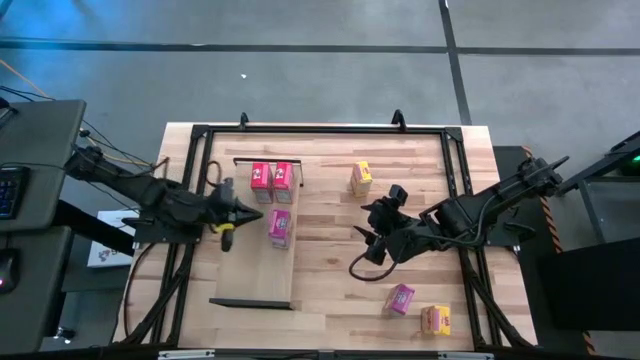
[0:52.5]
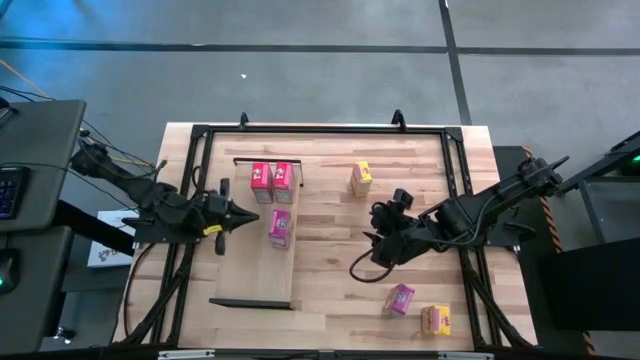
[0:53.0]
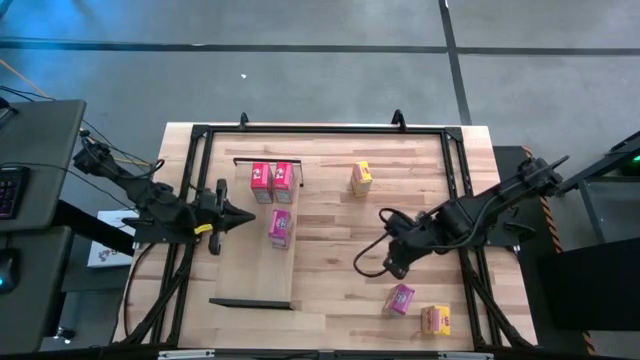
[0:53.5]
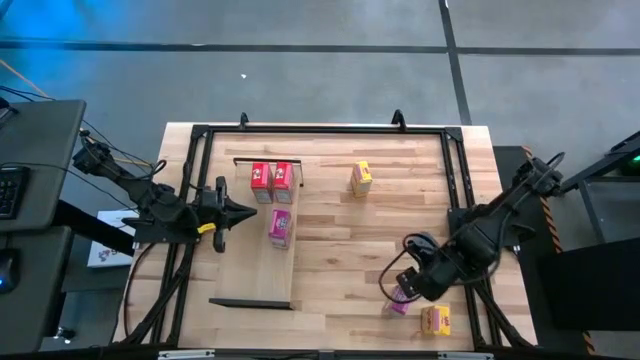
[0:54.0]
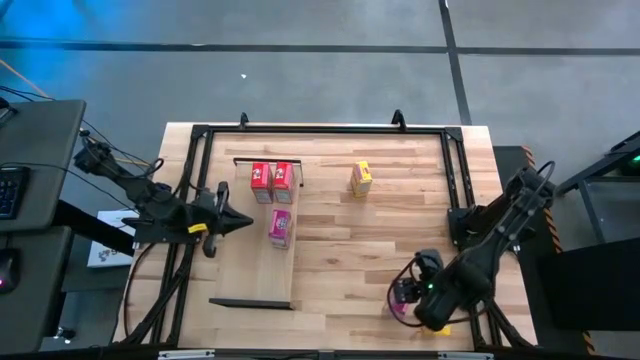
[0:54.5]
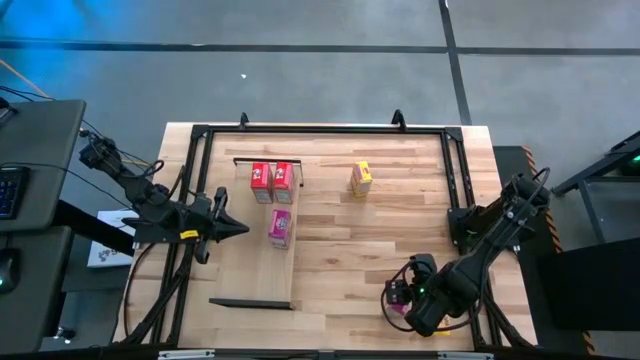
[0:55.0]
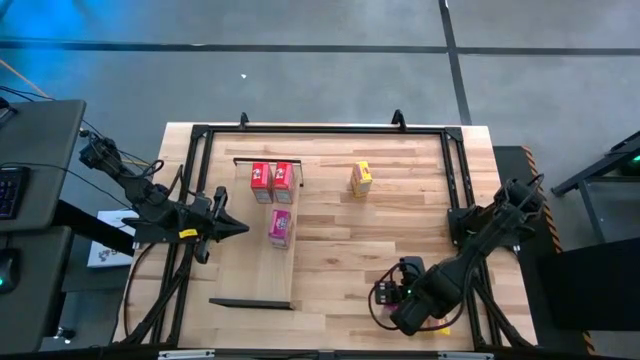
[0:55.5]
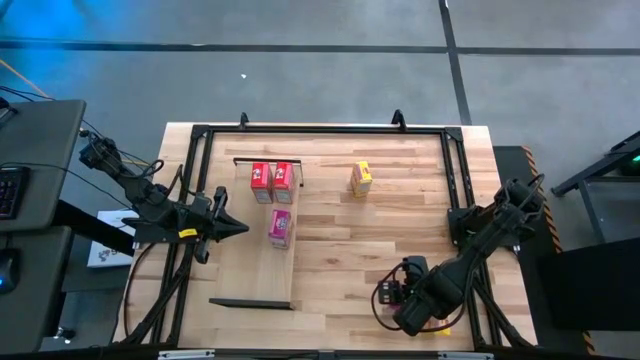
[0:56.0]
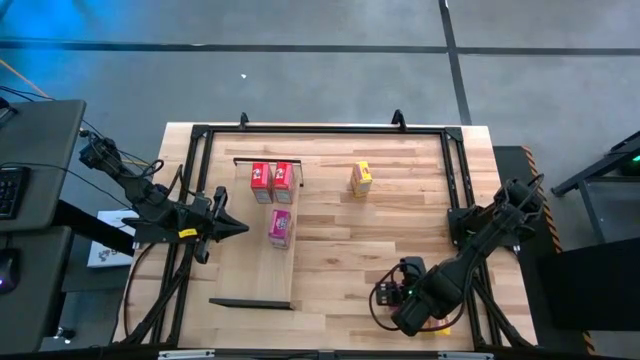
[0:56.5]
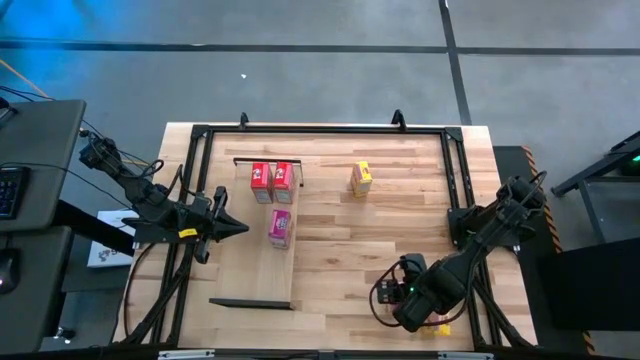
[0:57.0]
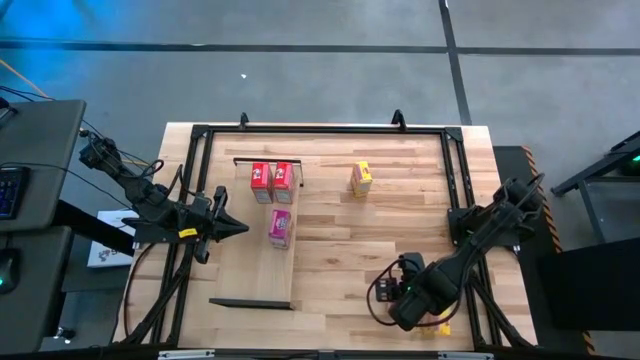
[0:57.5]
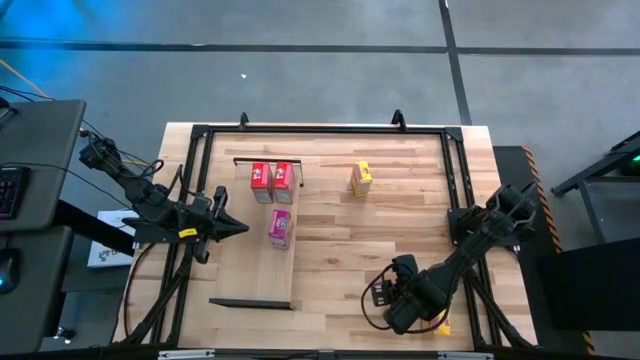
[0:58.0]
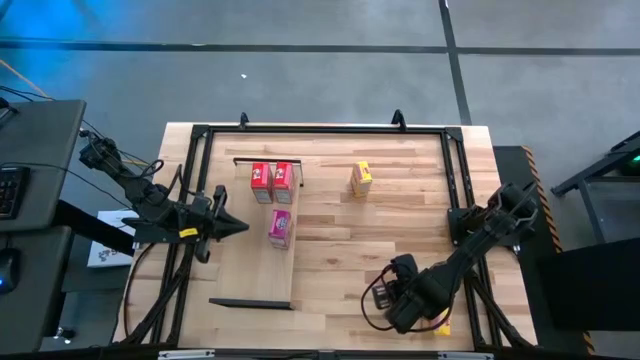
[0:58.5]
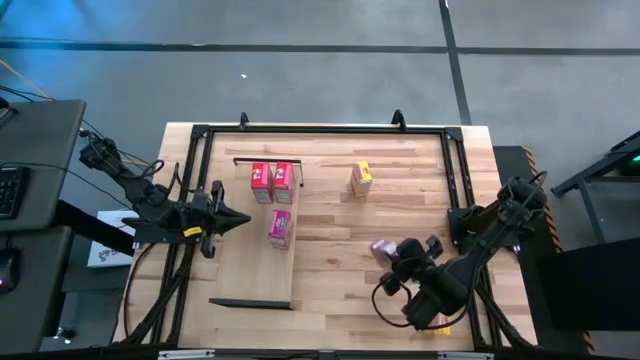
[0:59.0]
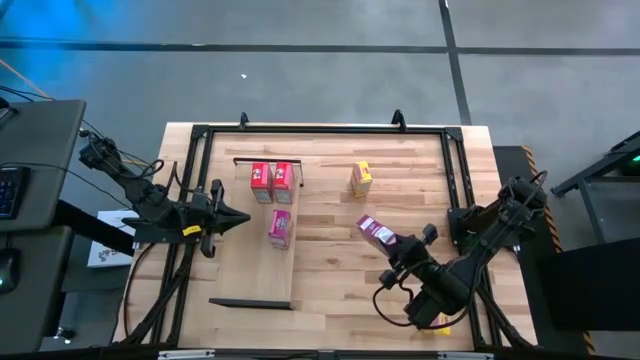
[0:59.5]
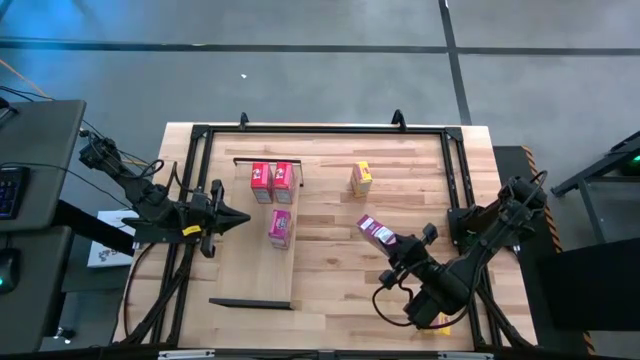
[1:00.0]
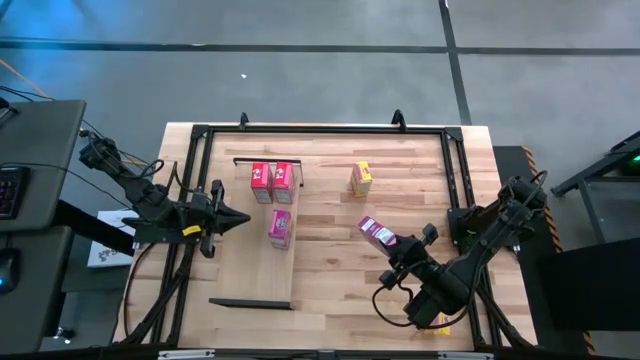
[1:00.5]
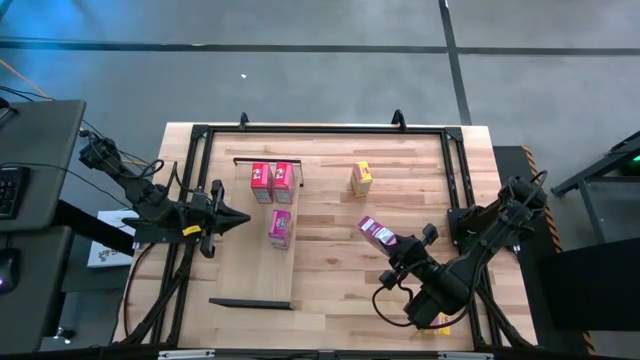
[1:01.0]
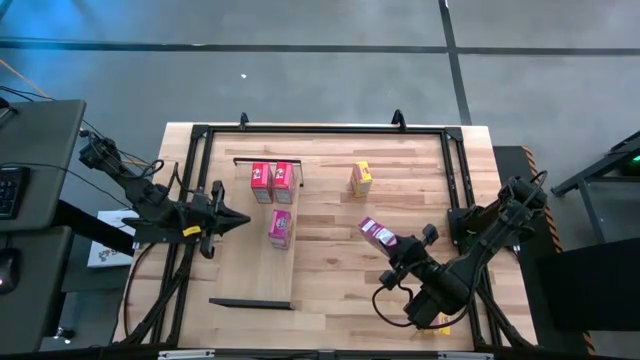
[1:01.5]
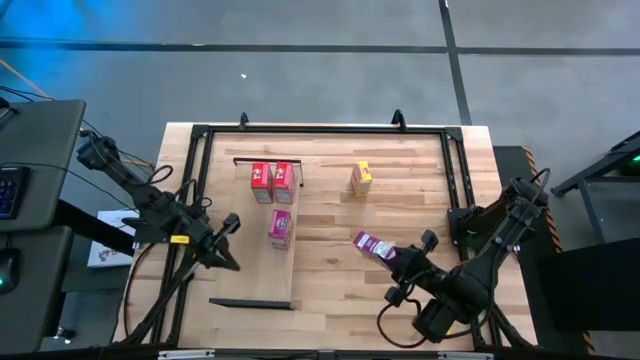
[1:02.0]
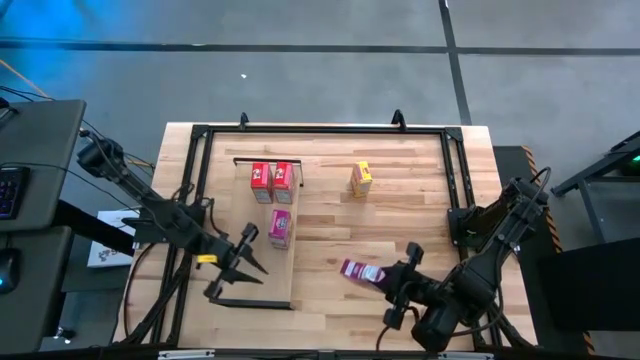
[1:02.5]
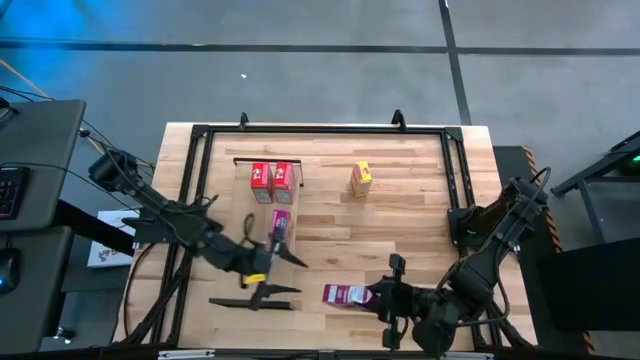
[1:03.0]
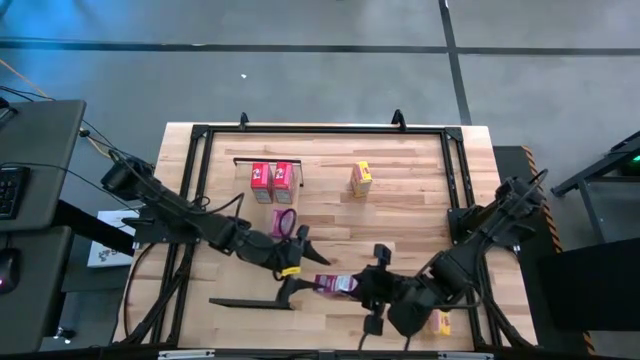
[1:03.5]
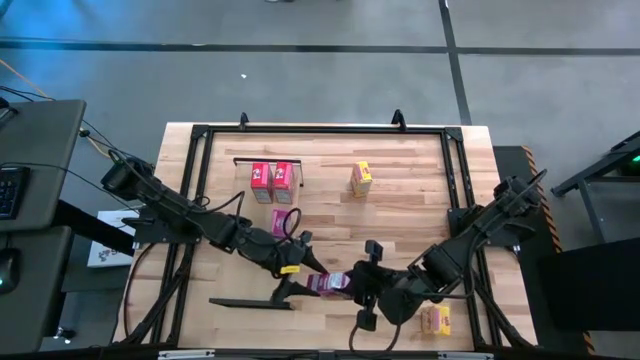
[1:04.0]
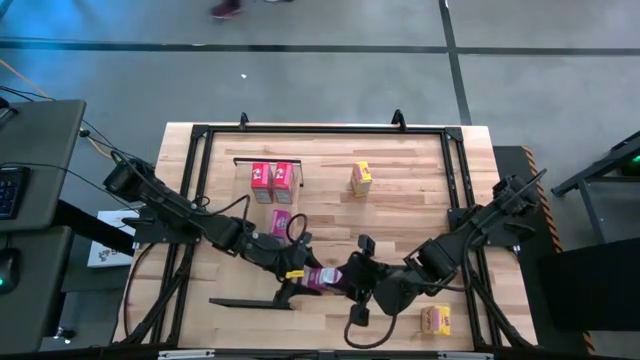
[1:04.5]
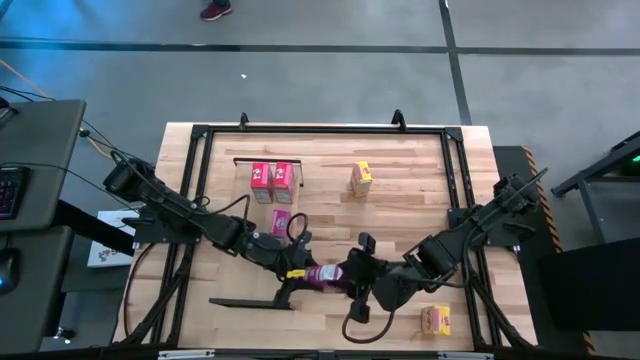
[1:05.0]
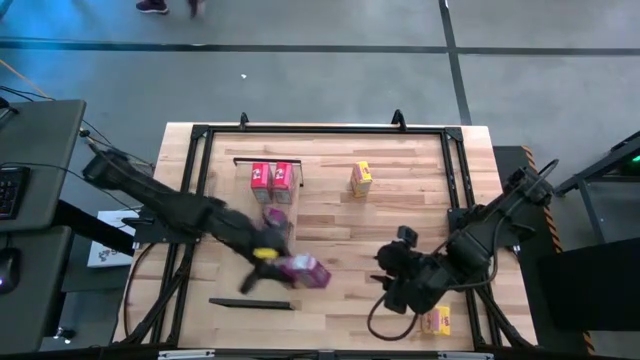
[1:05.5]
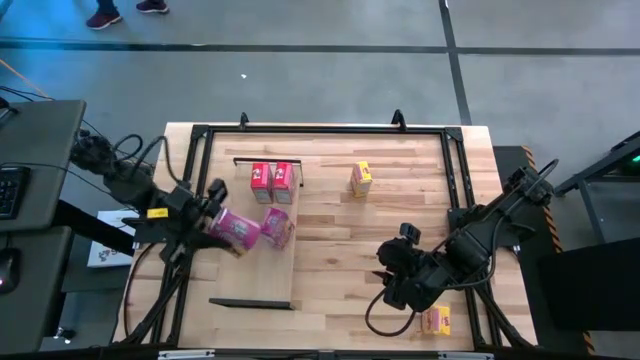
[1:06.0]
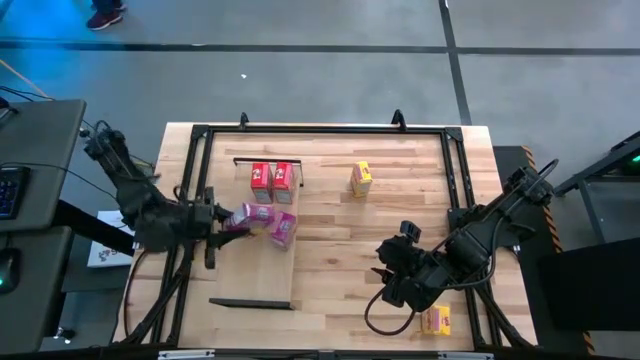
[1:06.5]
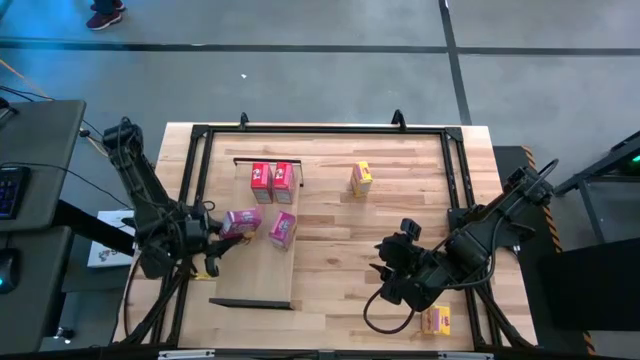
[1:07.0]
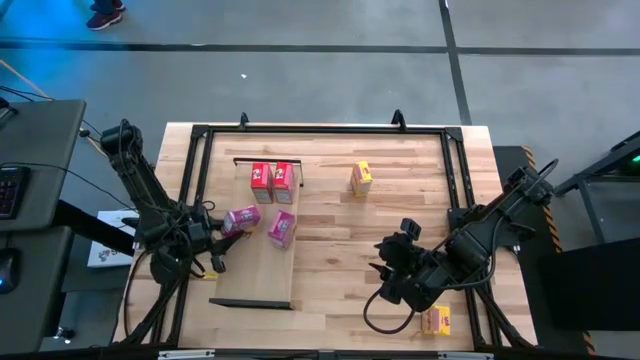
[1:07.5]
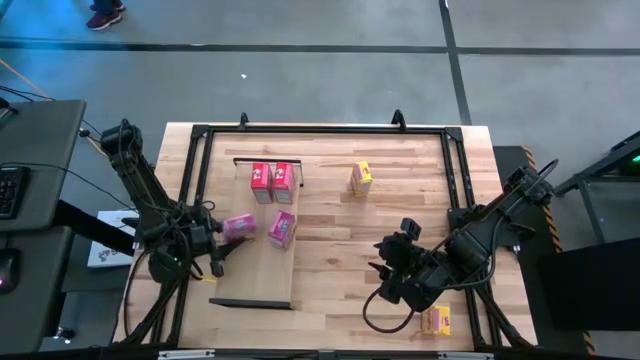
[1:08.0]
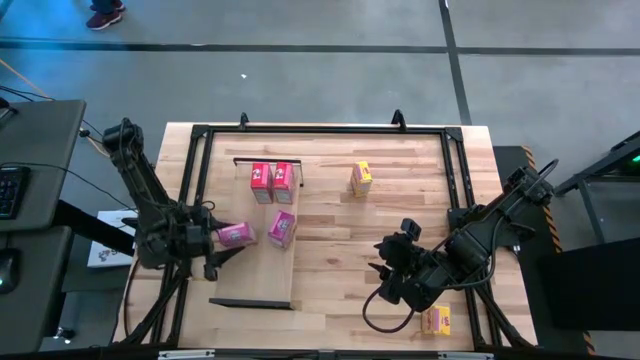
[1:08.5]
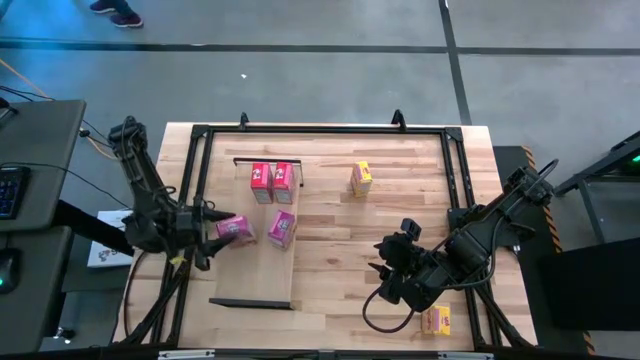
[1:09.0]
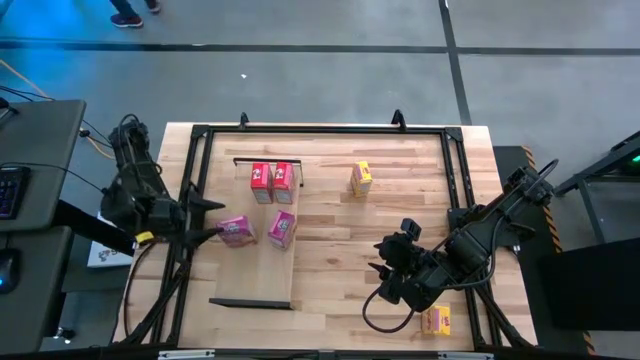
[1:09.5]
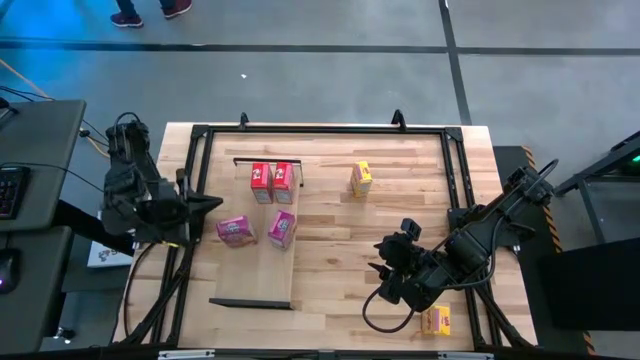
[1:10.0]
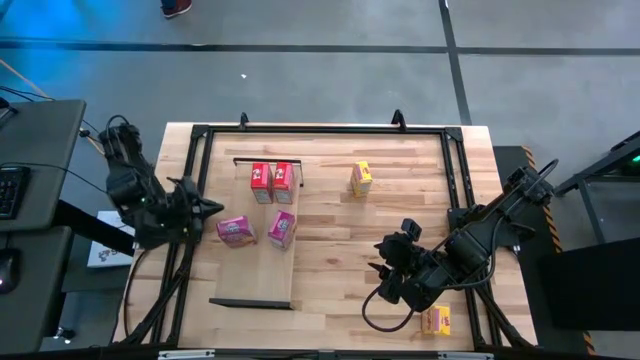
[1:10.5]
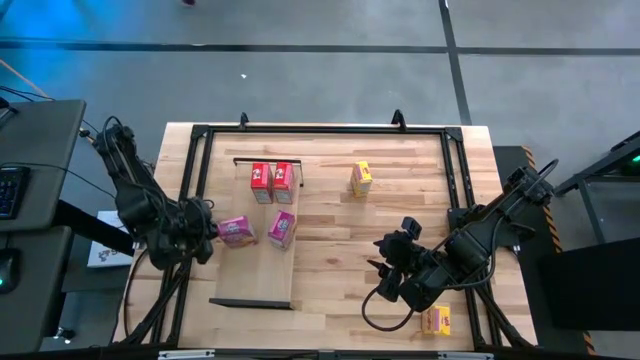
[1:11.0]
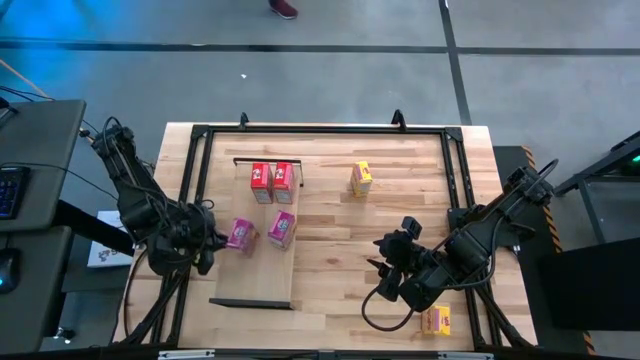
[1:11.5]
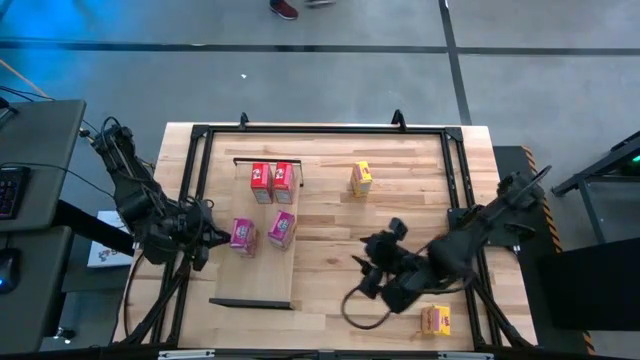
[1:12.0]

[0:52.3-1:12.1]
Task: Stack cereal on shelf
Put the purple cereal box on the shelf aligned with the purple cereal box

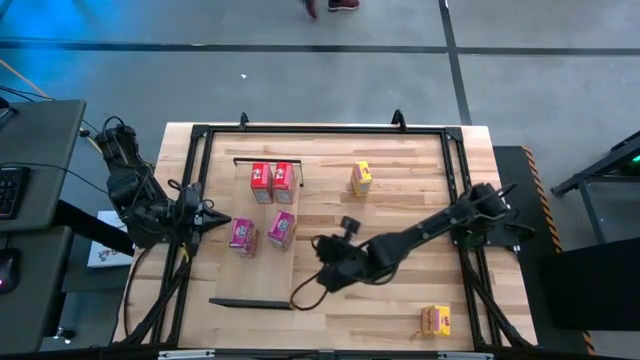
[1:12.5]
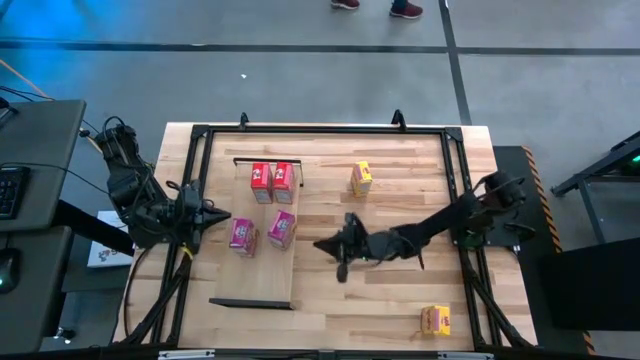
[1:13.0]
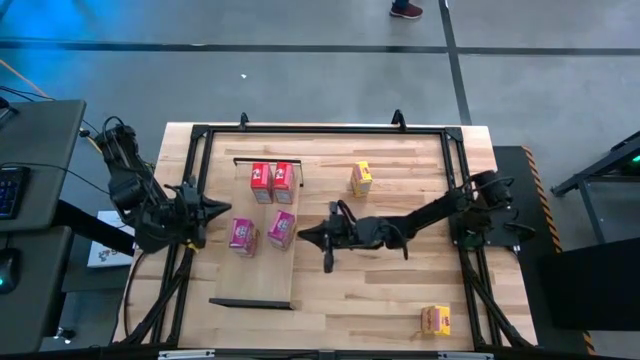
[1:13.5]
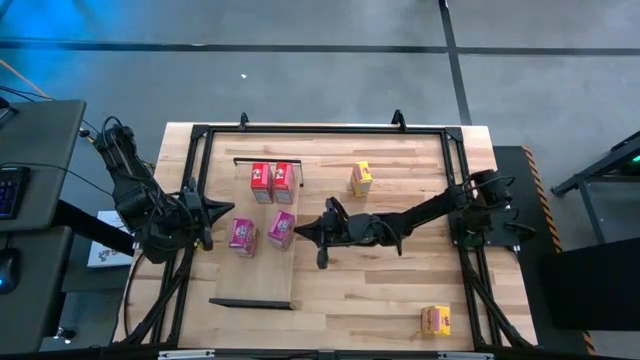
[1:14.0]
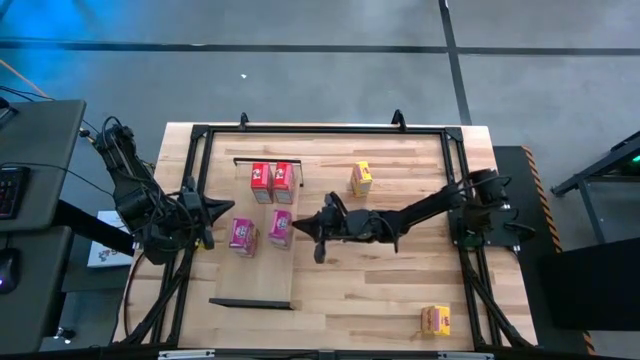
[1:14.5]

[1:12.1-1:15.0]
Adjust the purple cereal box on the shelf
